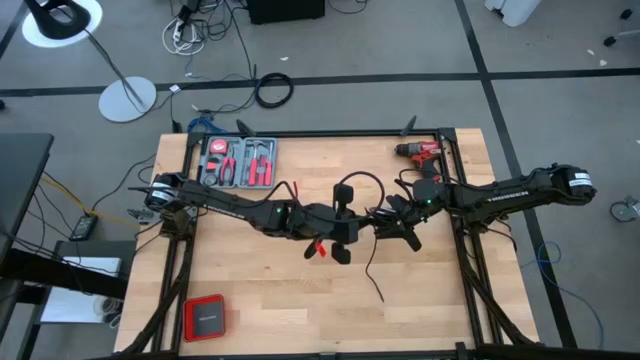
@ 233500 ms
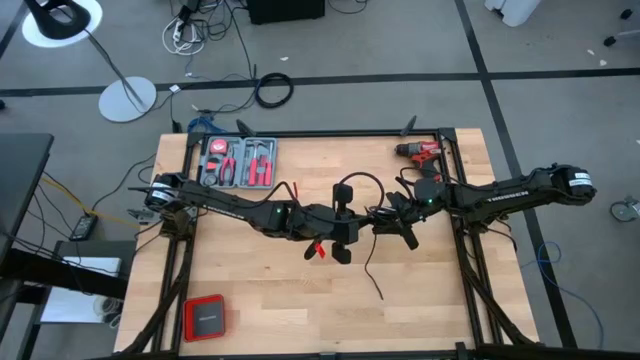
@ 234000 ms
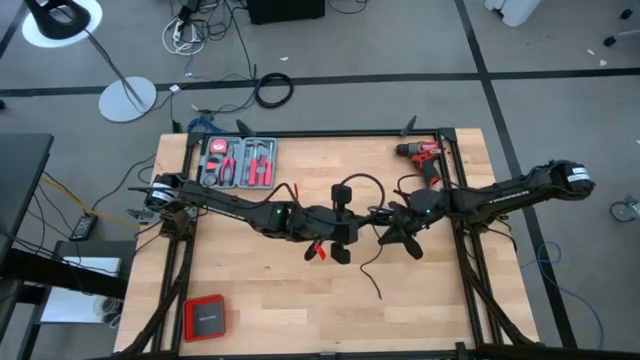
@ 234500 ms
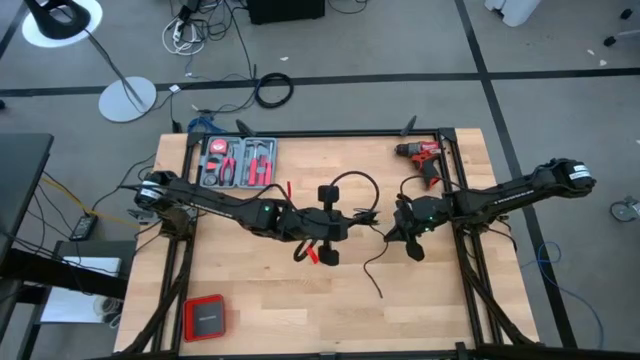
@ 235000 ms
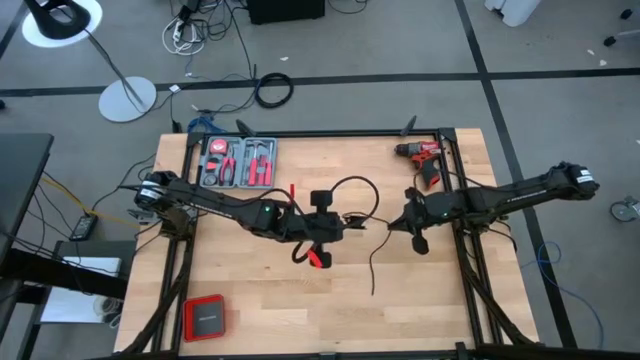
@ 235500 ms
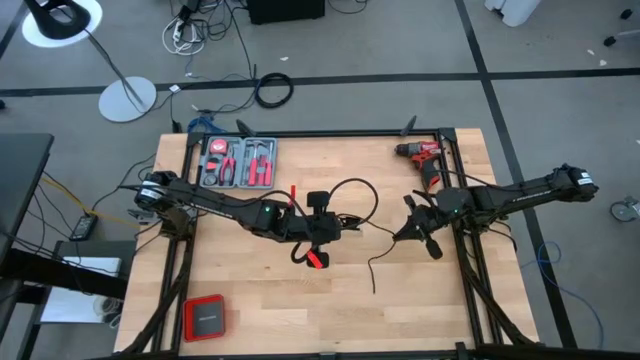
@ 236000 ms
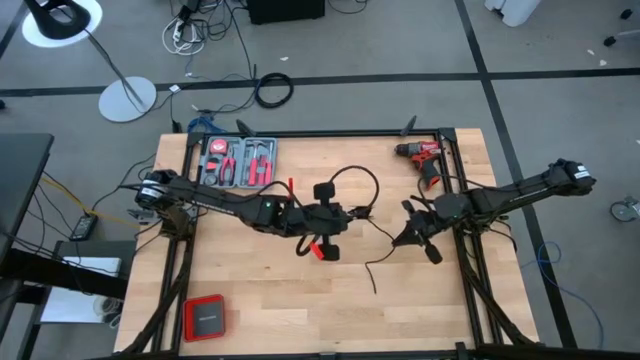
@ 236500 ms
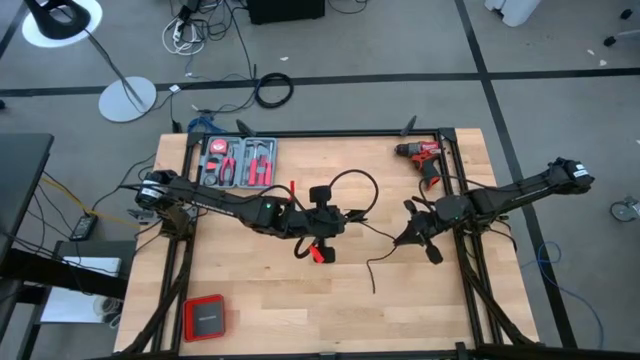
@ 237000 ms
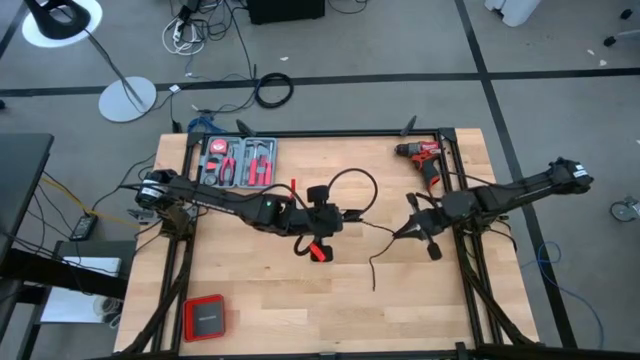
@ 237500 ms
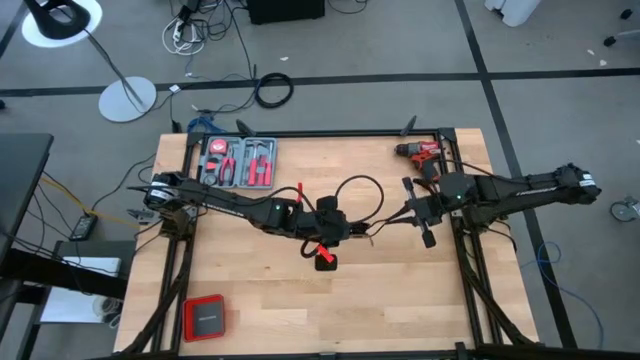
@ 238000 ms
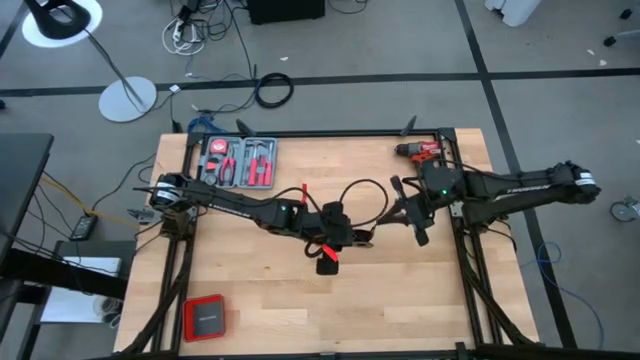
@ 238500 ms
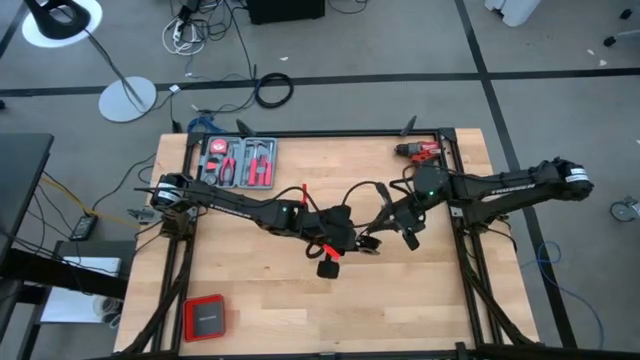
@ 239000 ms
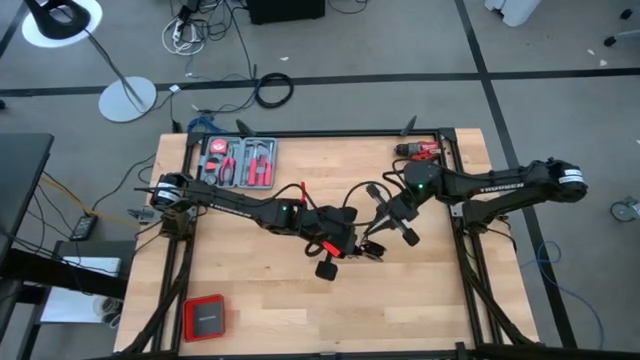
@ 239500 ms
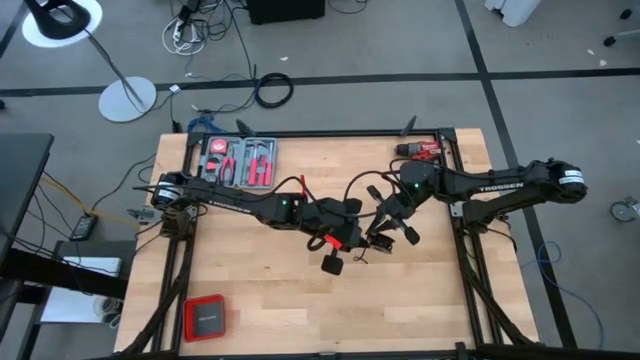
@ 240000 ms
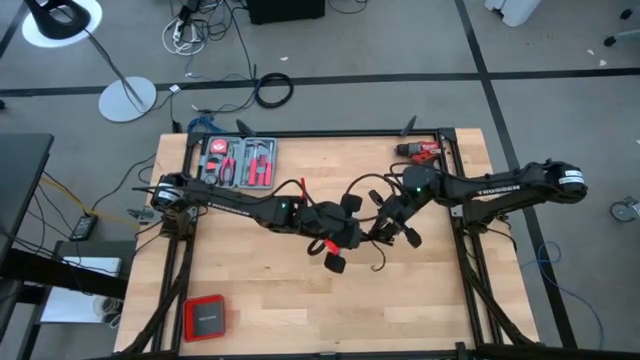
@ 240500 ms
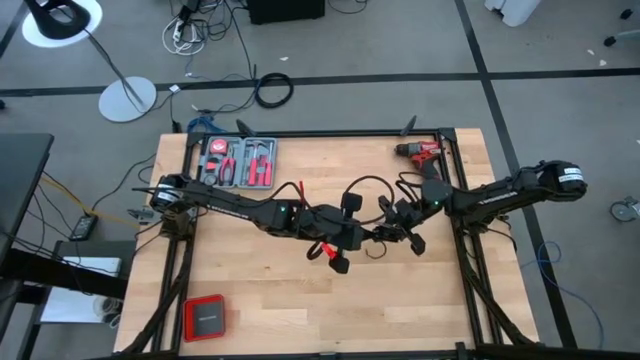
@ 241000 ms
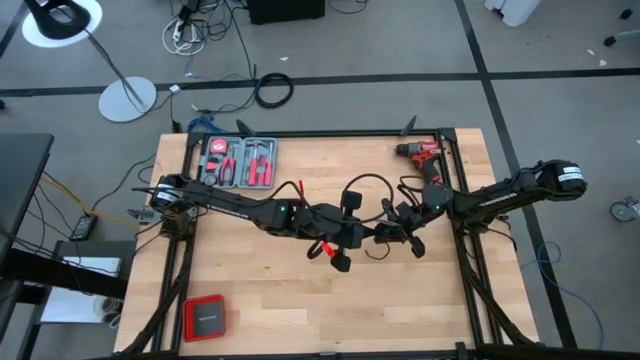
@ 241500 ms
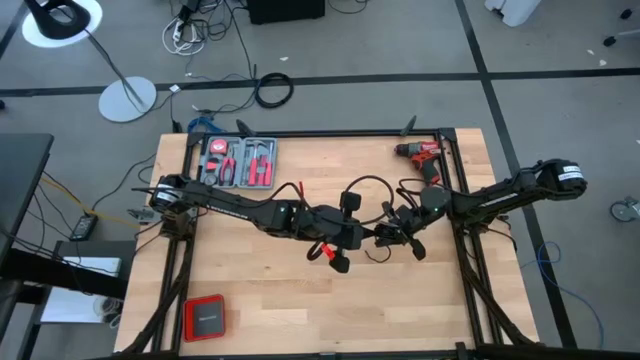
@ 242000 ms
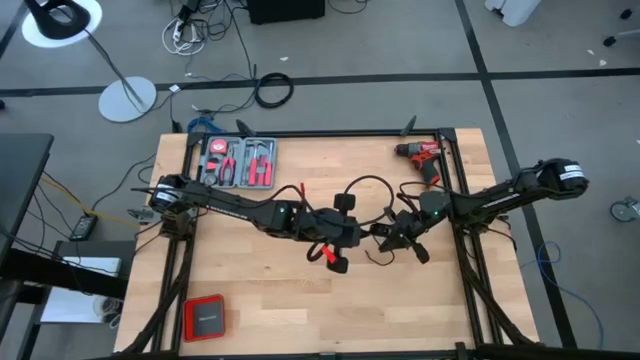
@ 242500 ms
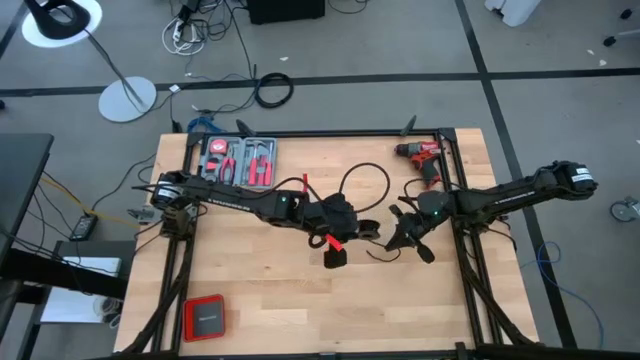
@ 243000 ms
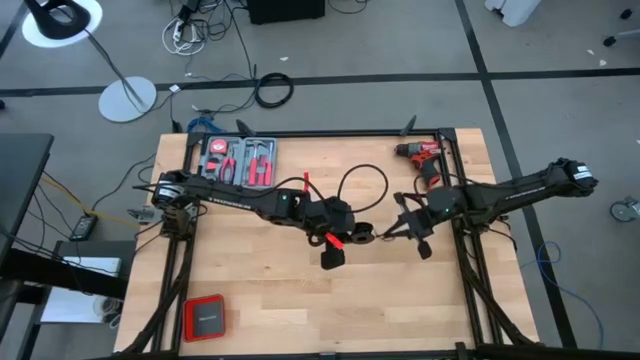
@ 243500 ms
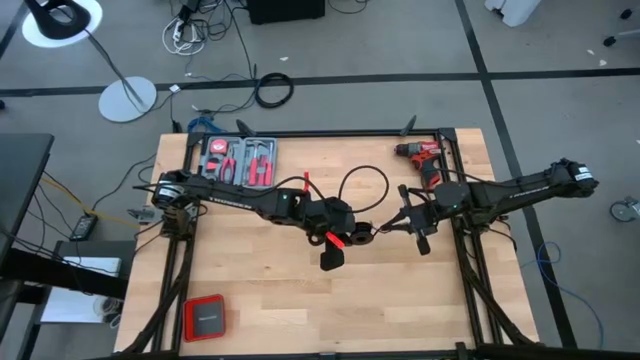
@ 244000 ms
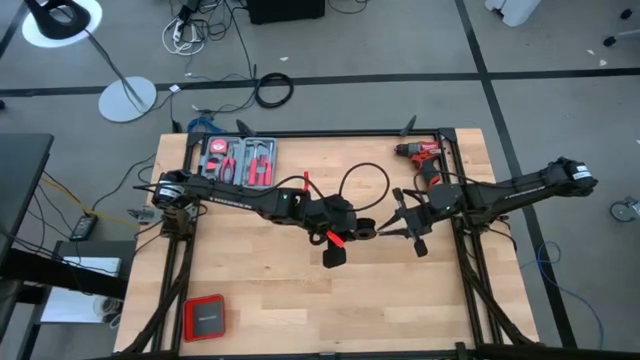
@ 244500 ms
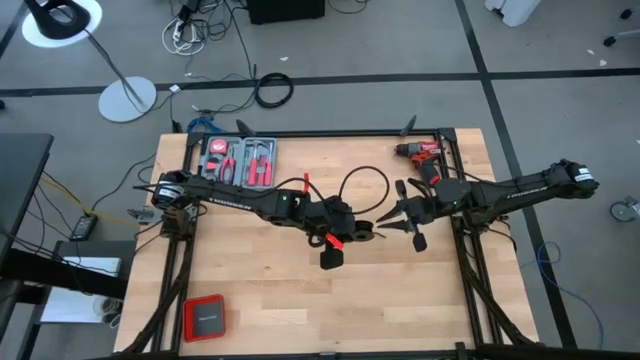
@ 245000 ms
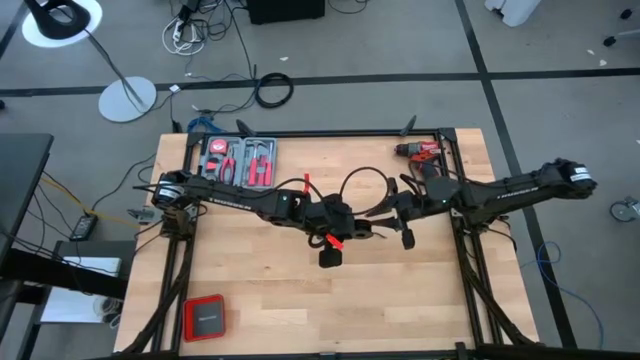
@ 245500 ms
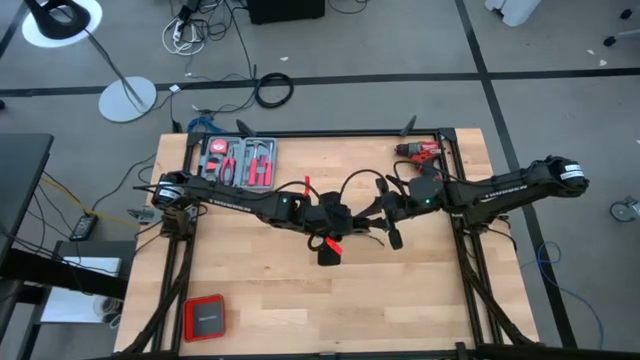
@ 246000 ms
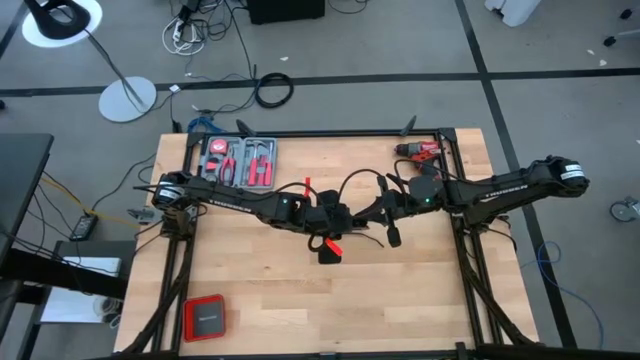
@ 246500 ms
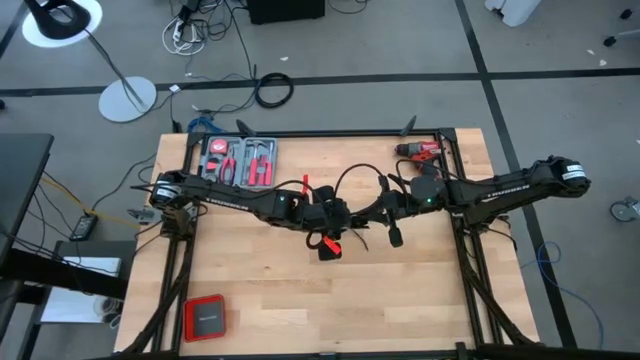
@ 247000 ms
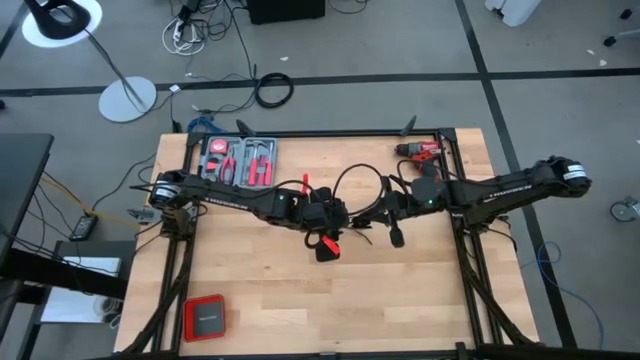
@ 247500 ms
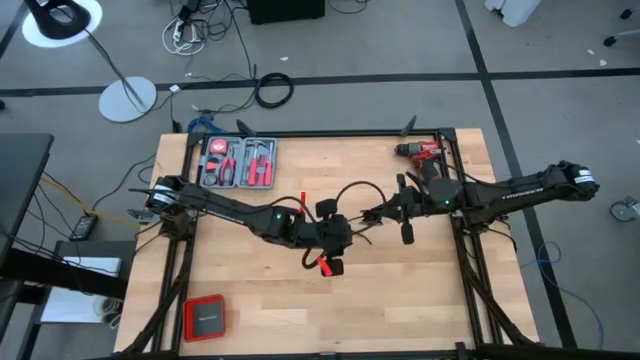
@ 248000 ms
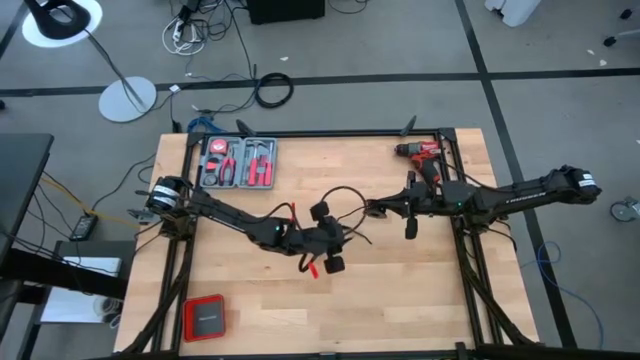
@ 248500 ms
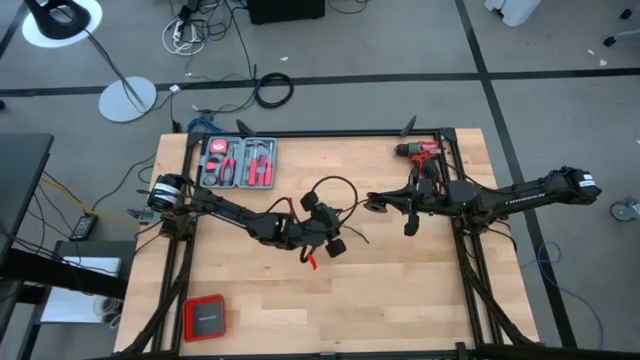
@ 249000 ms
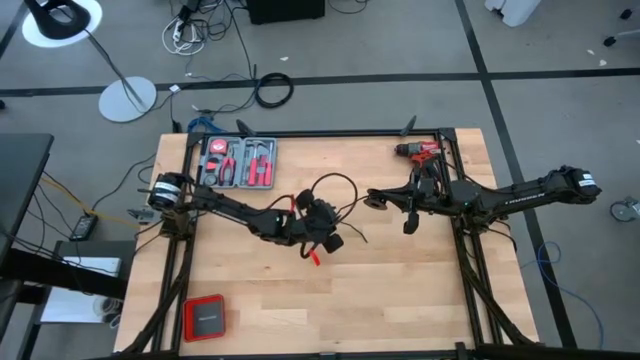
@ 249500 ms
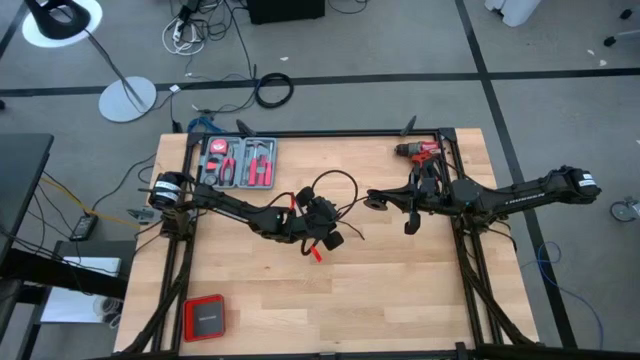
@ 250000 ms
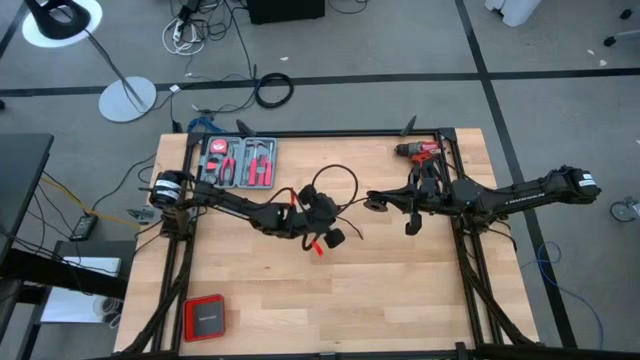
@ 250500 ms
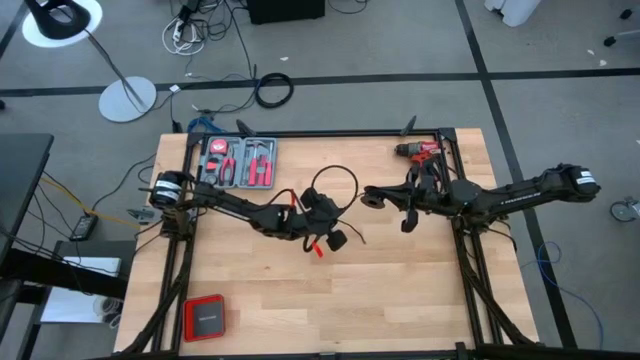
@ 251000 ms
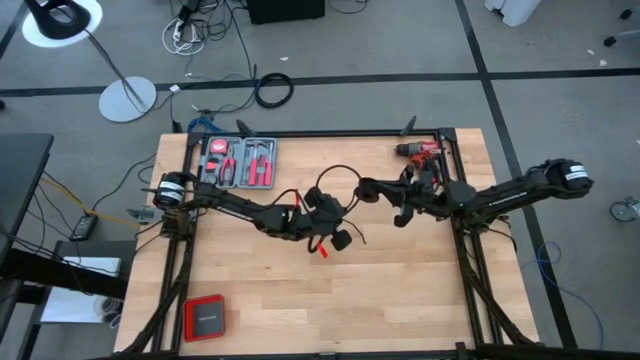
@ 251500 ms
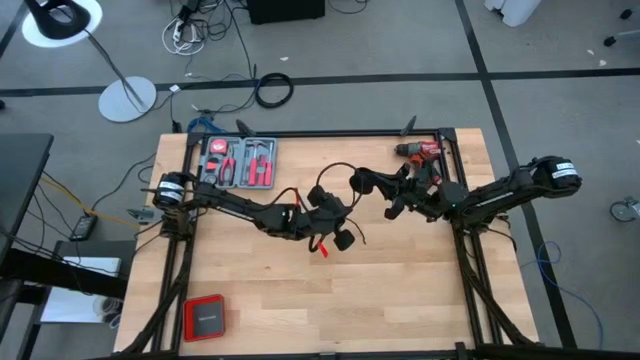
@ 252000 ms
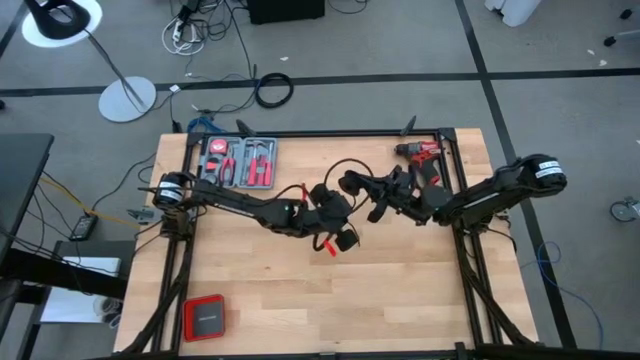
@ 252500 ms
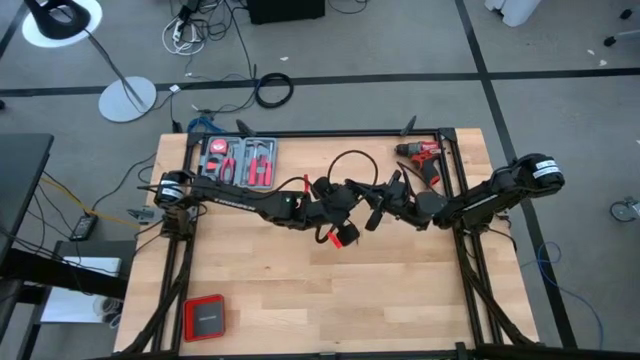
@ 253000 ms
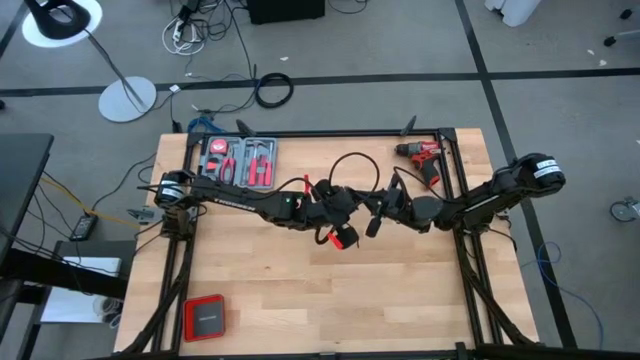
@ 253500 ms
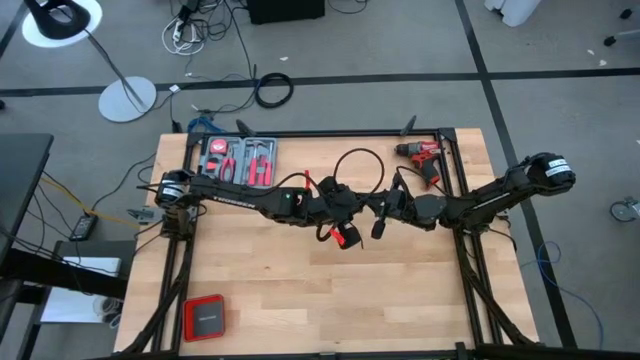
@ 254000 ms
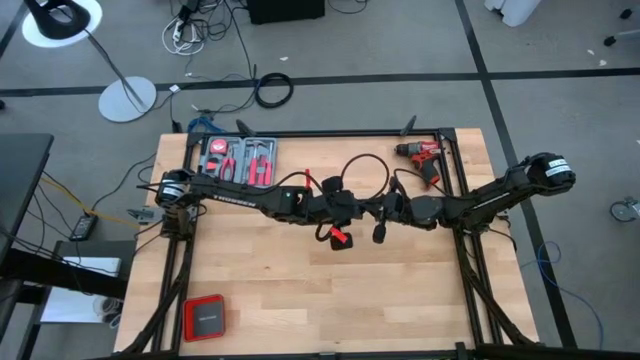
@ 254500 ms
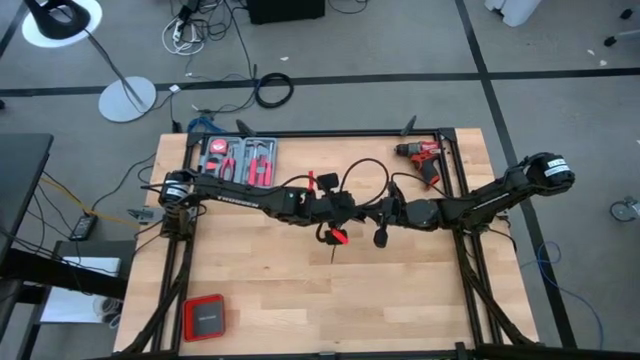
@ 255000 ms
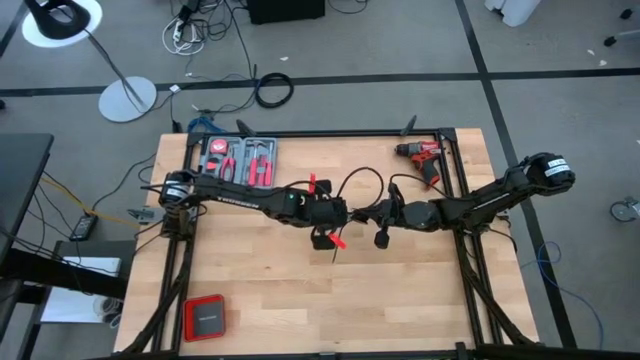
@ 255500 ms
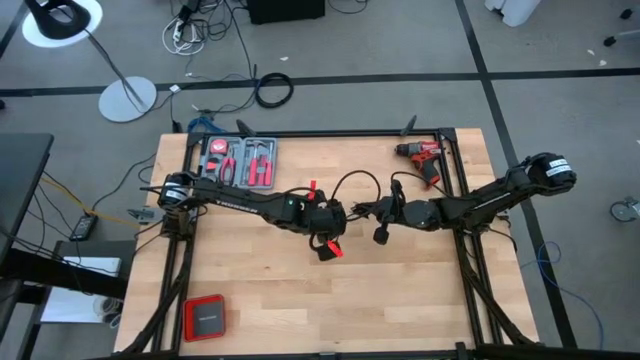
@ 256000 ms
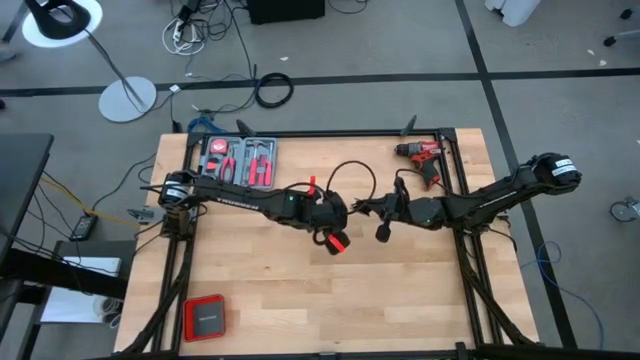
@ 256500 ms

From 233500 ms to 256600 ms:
Task: Coil cords
Coil the black wire on the spool
